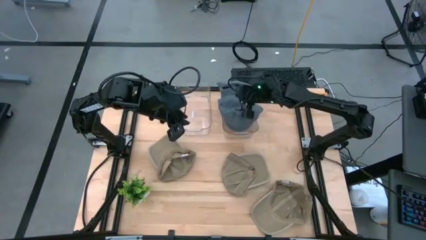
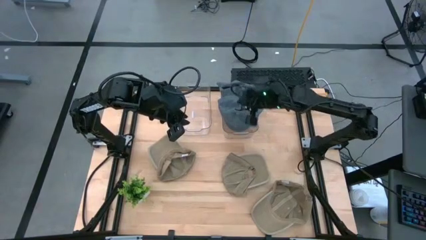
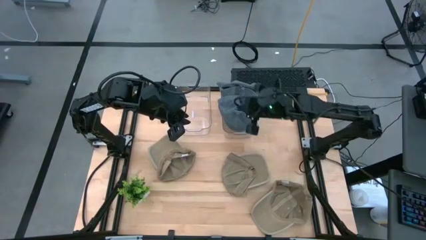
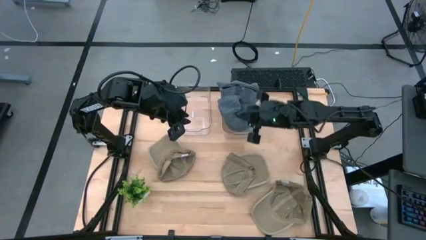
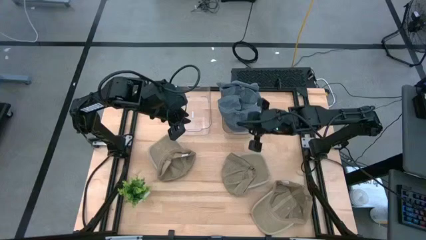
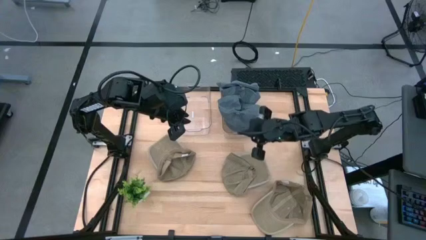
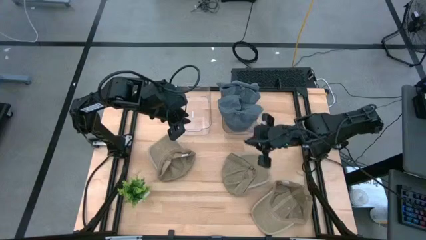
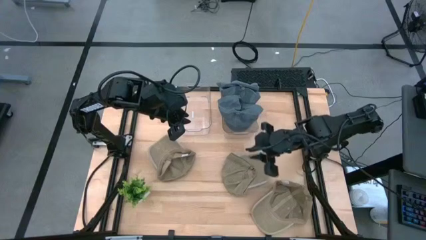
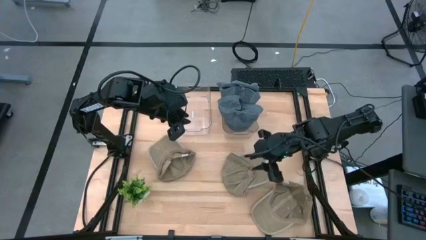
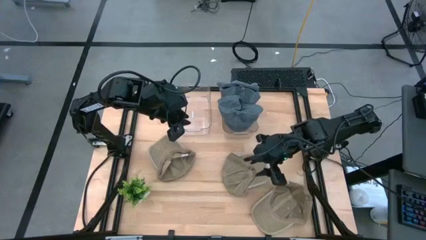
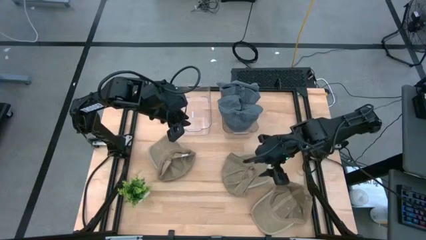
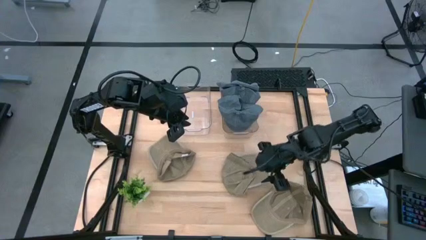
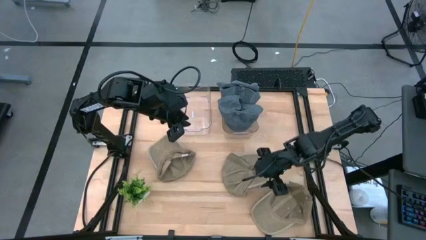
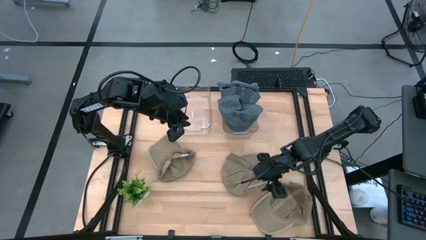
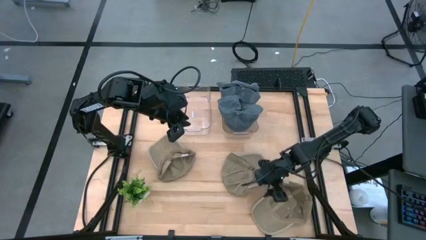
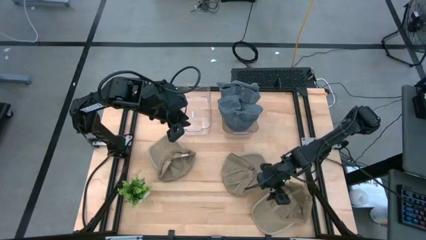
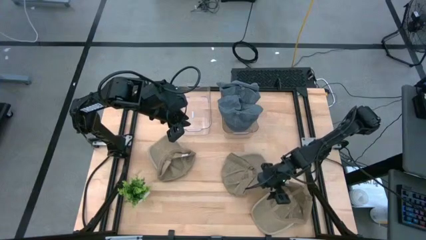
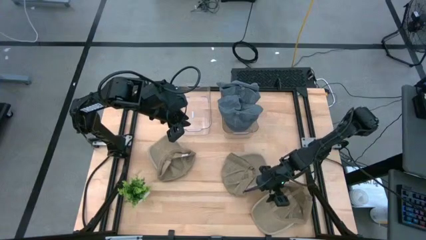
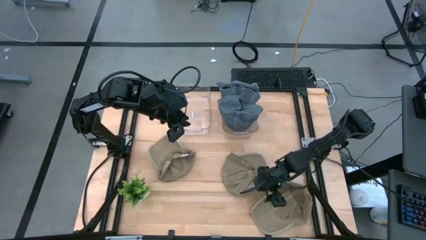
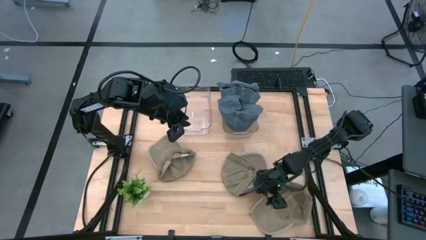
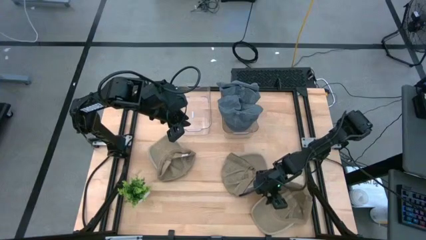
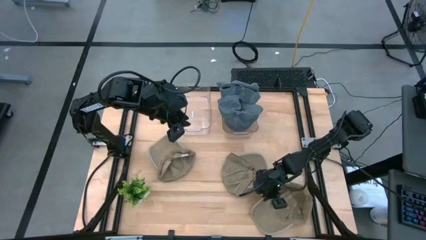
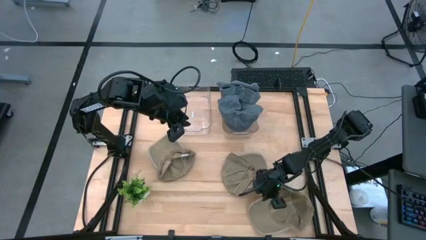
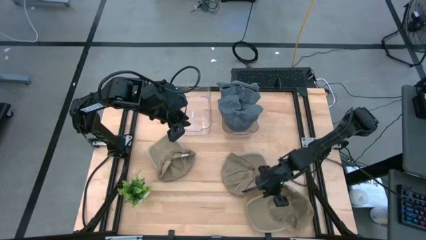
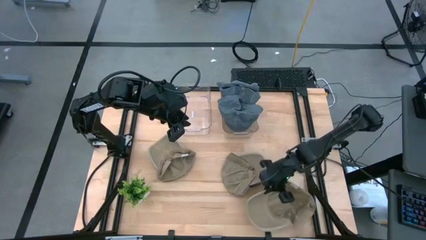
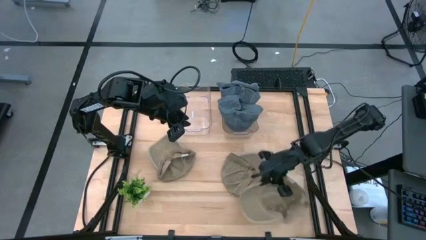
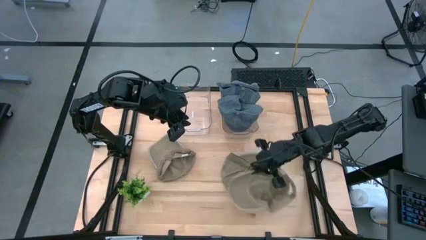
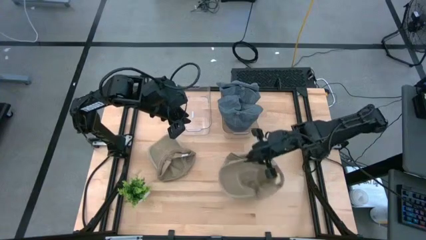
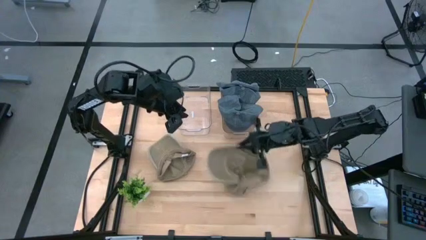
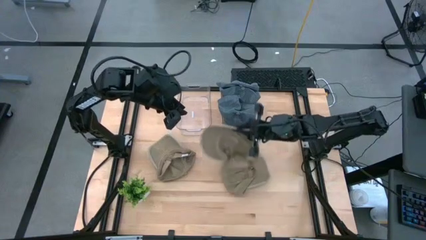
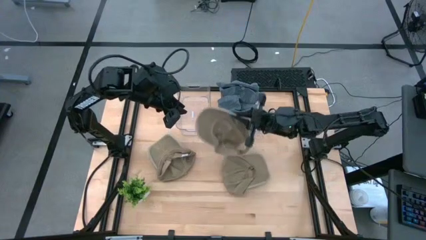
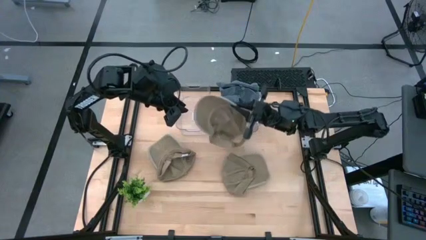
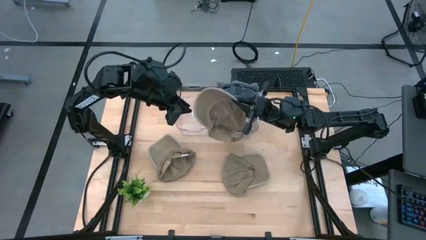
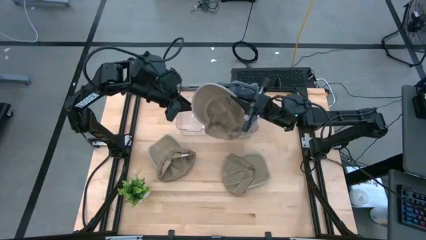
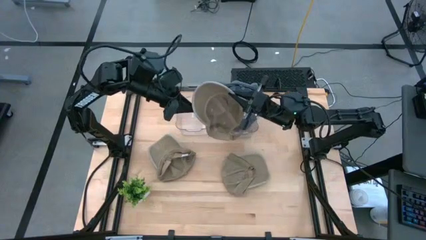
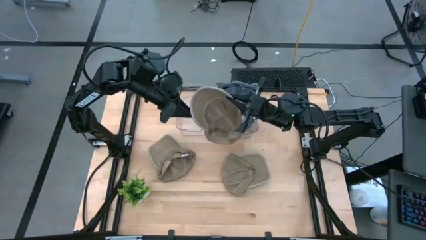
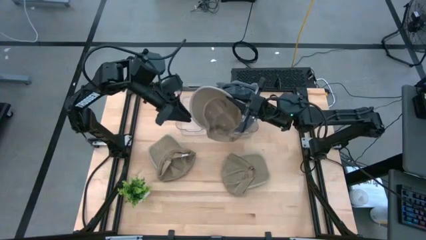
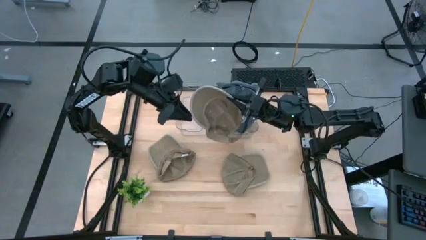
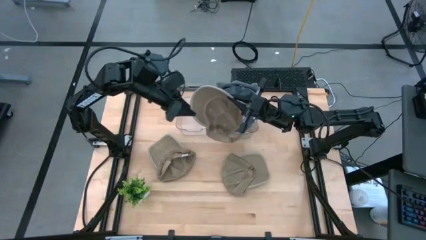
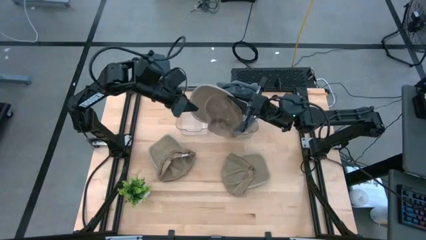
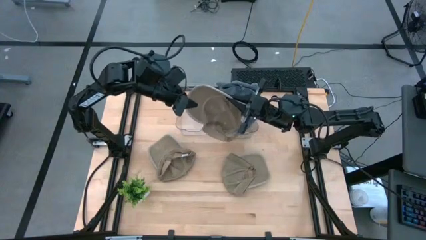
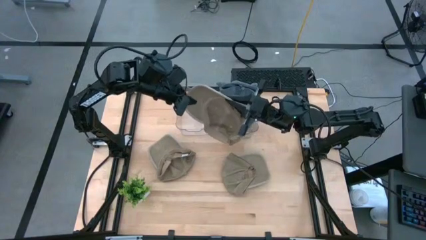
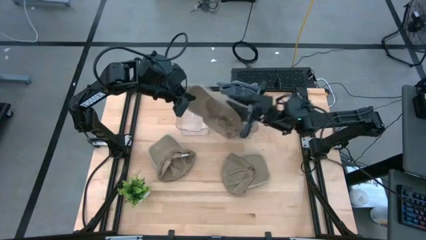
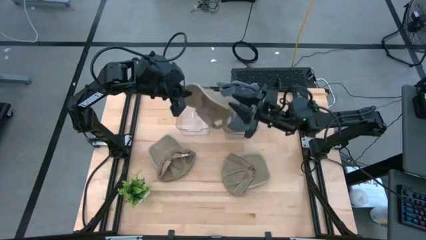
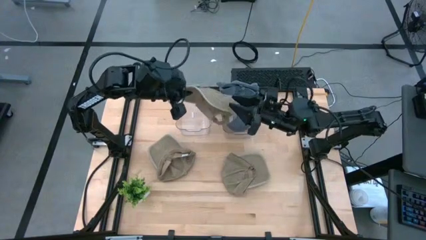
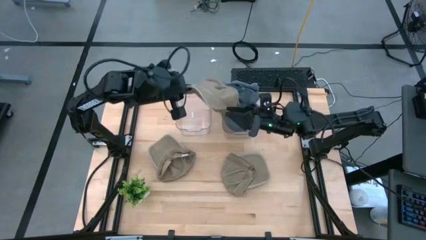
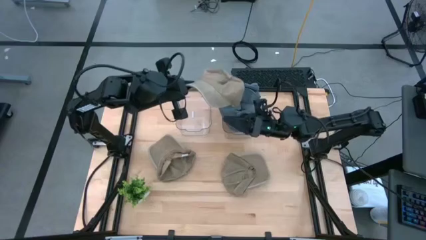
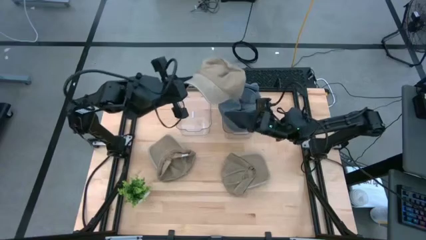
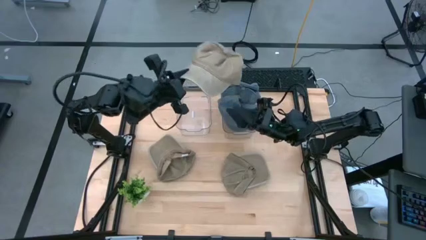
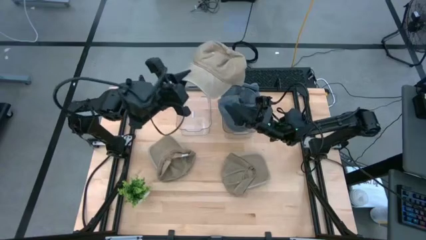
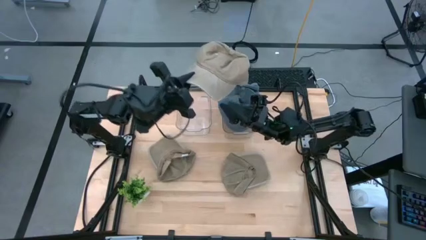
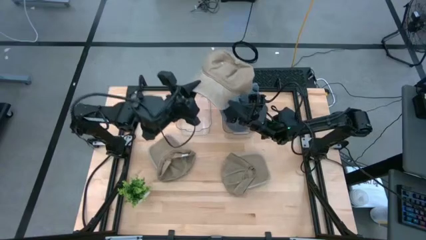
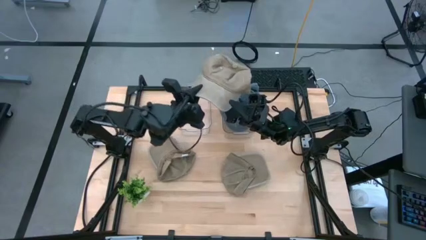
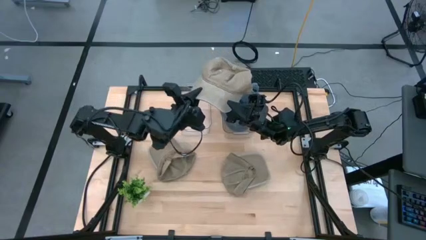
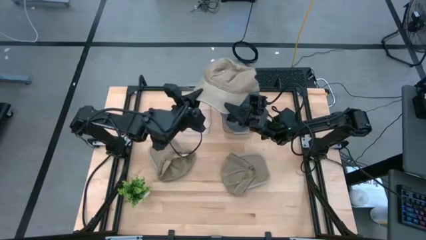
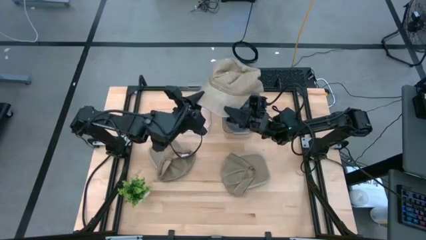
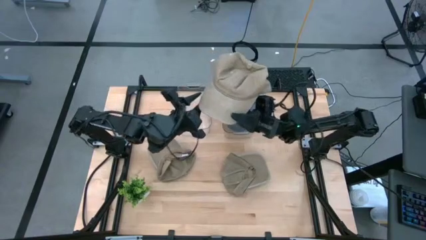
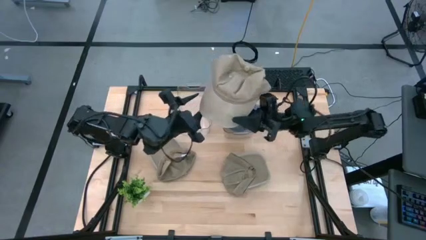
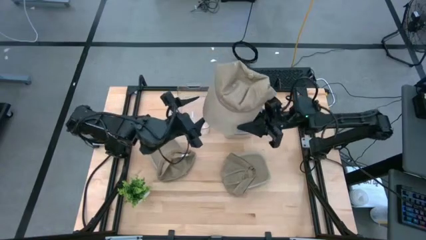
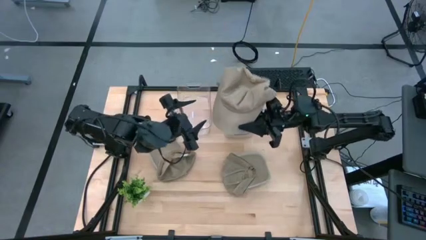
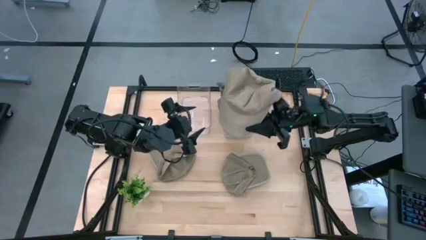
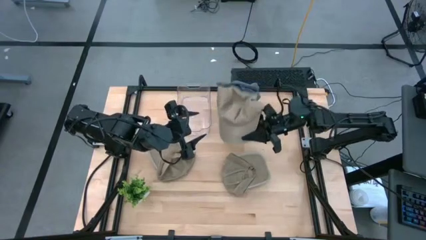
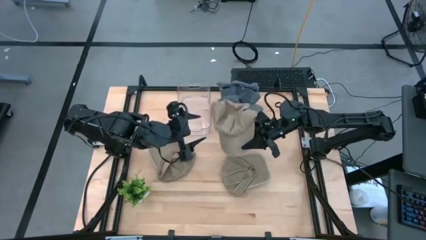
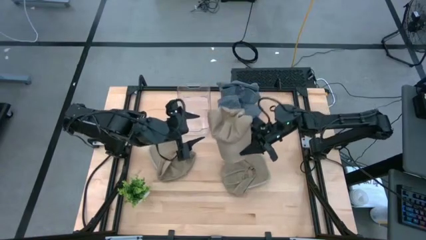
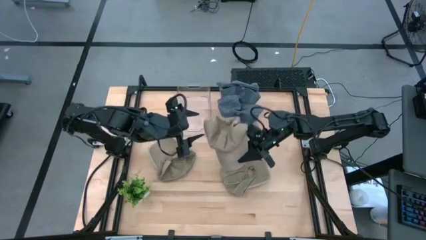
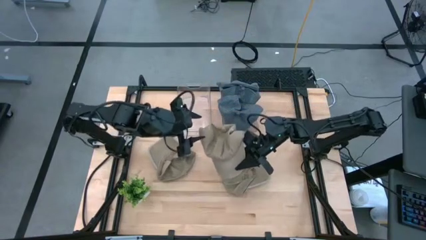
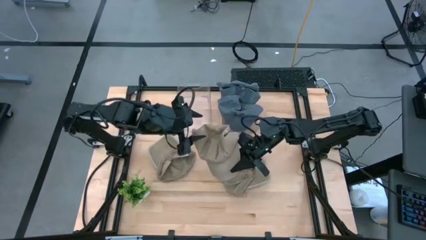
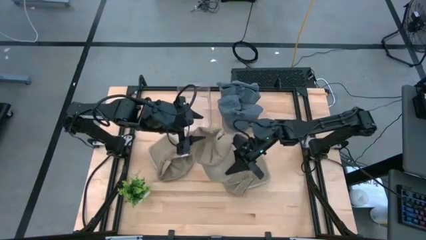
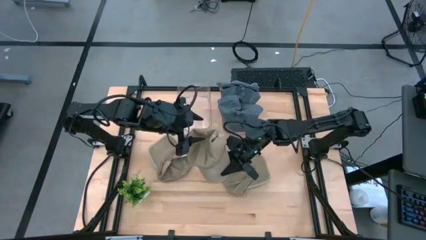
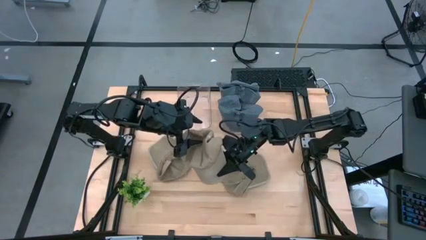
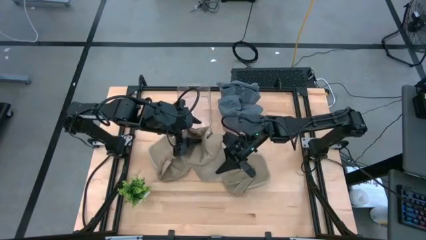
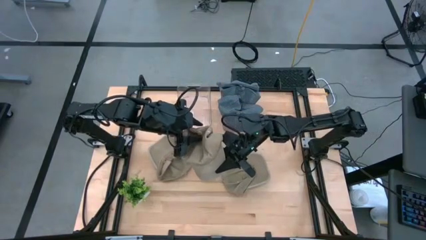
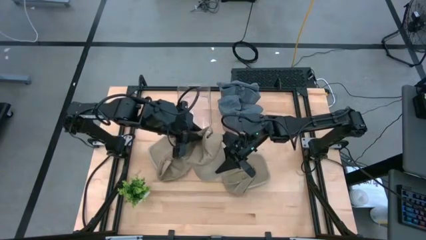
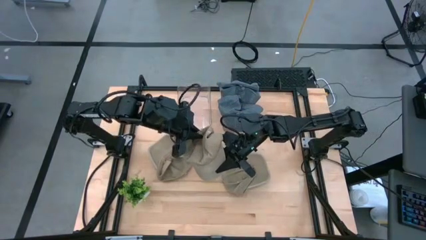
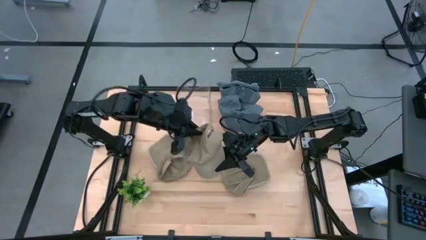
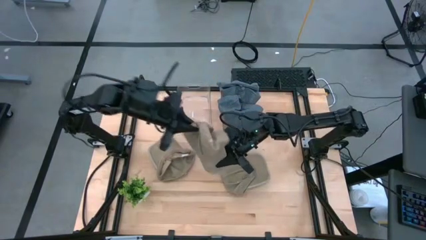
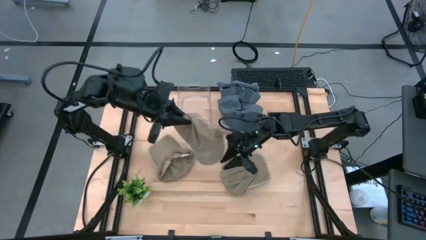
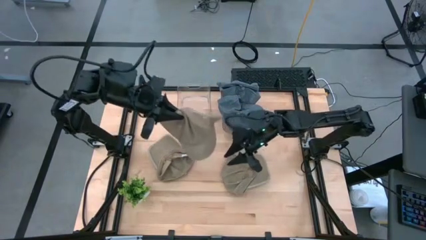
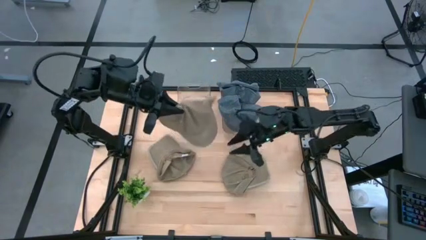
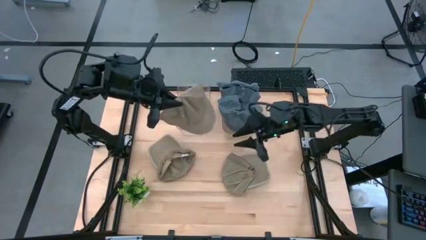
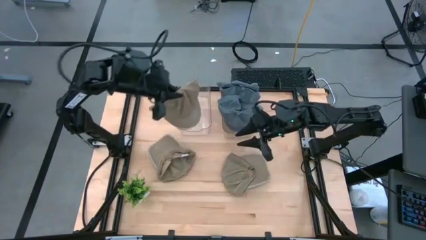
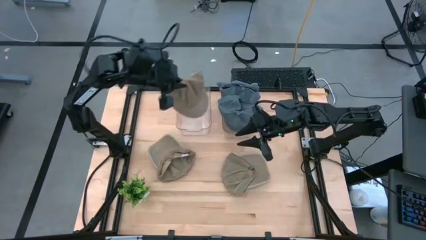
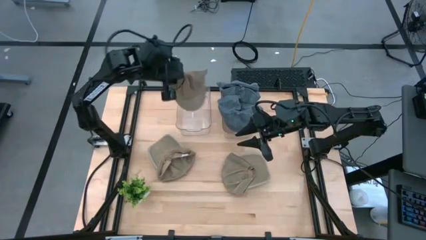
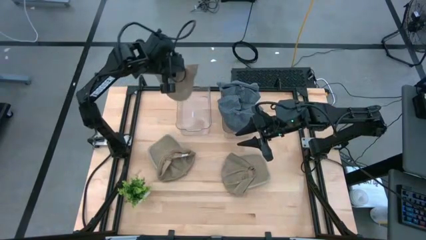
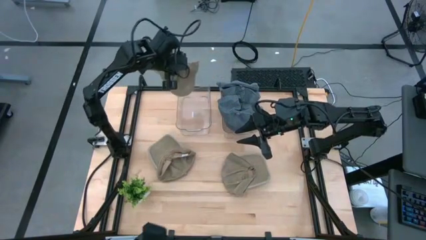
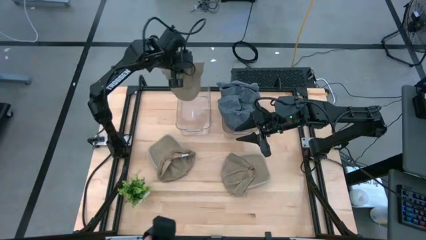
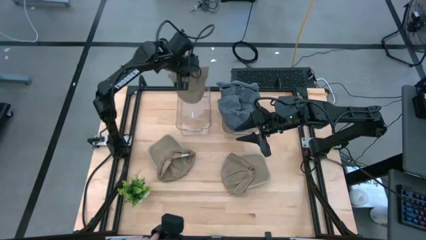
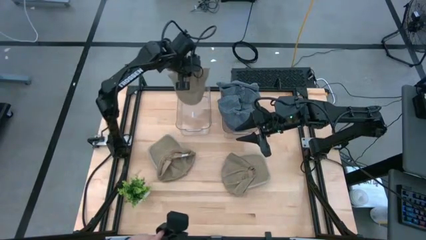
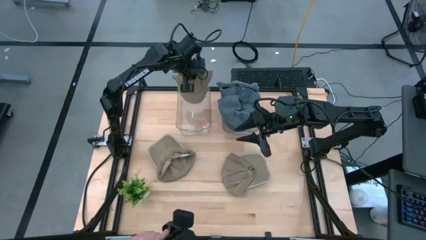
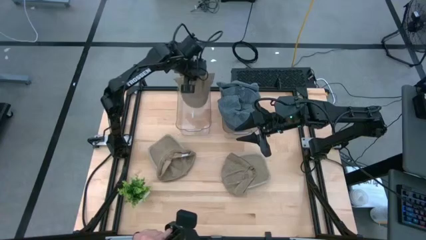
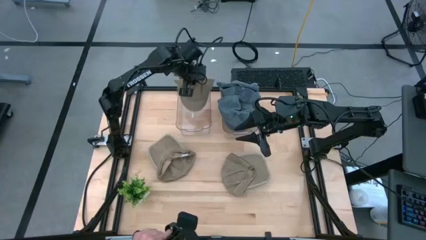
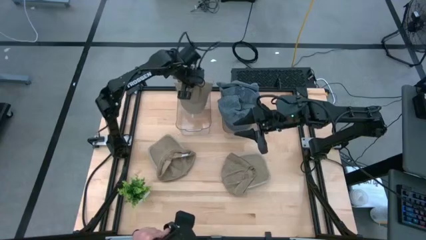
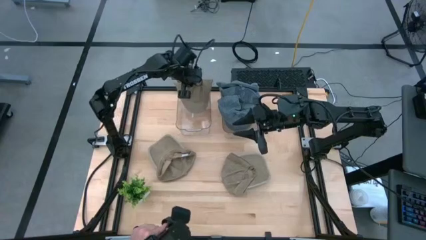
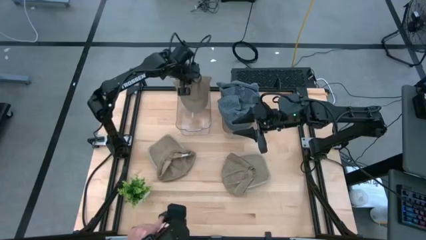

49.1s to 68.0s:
Task: Pick & Place hat
Put the bottom right brown cap into the left transparent bin
